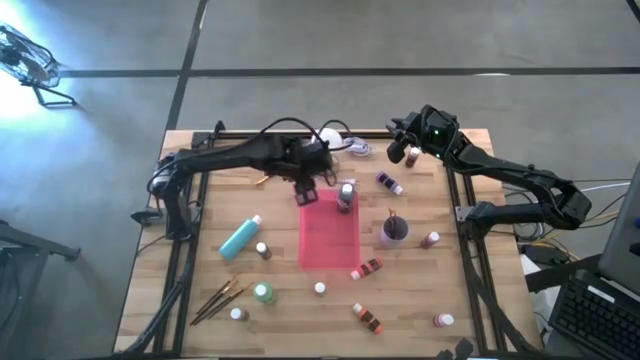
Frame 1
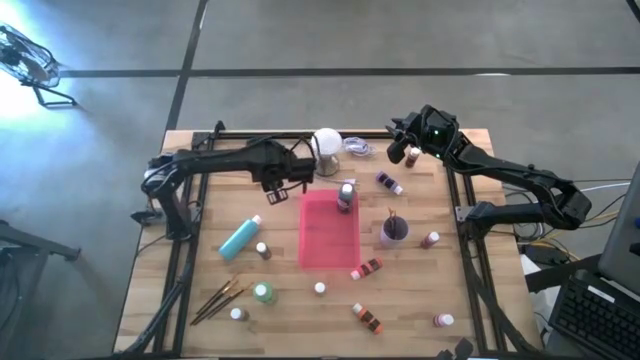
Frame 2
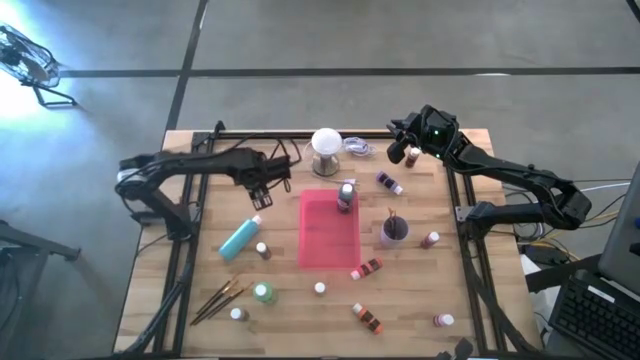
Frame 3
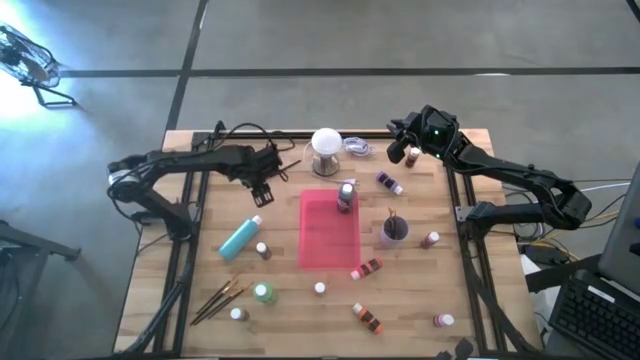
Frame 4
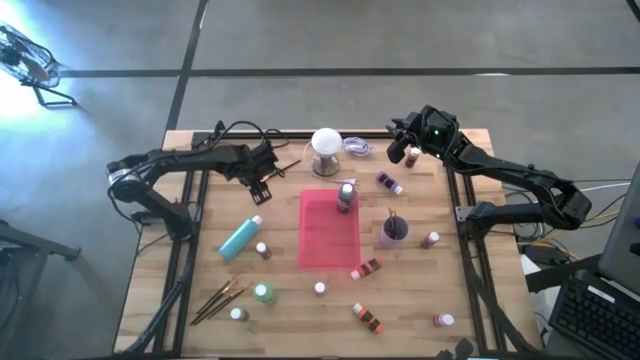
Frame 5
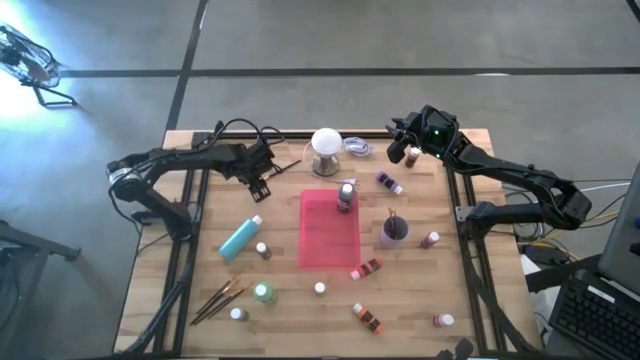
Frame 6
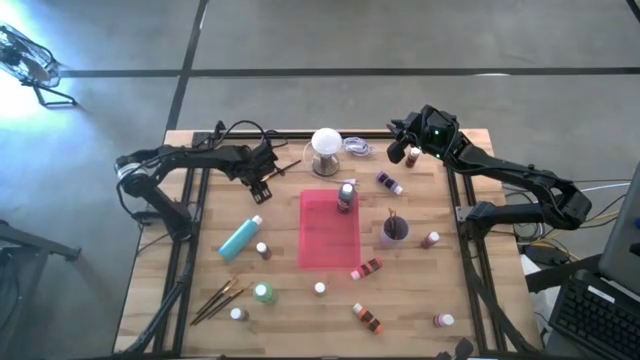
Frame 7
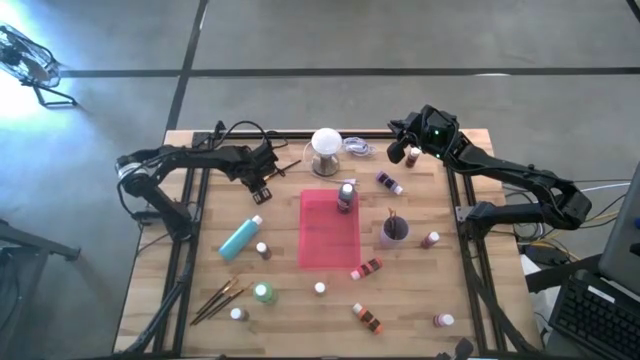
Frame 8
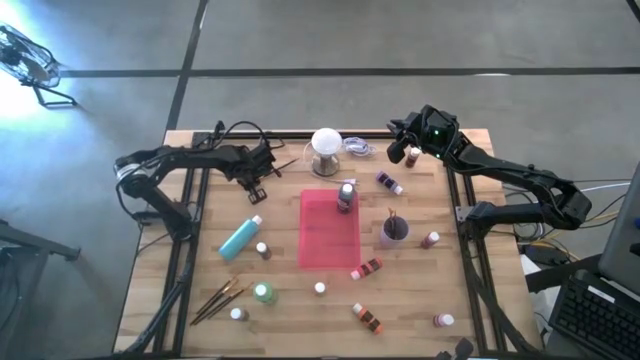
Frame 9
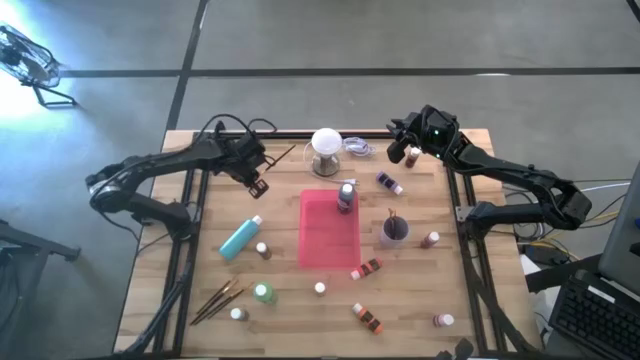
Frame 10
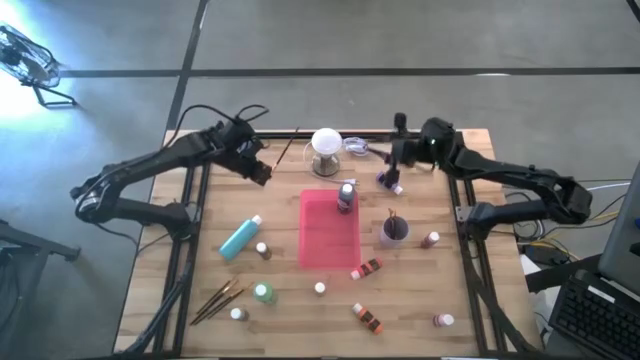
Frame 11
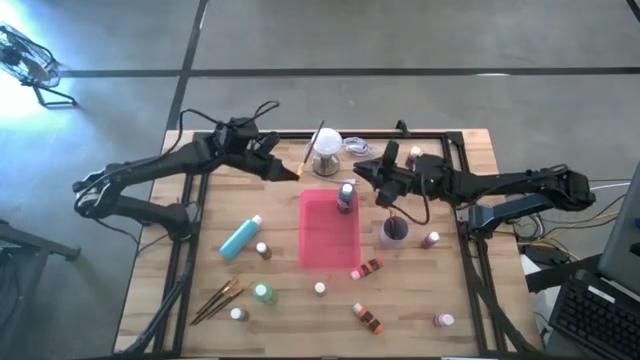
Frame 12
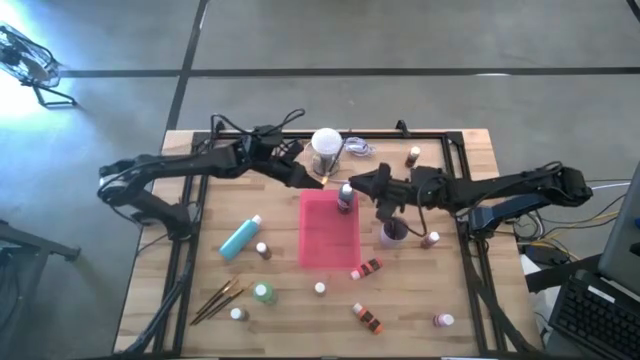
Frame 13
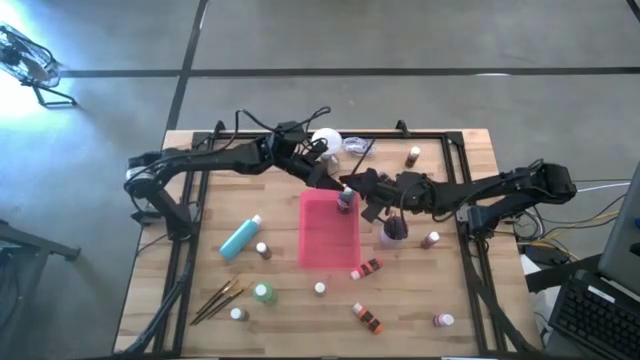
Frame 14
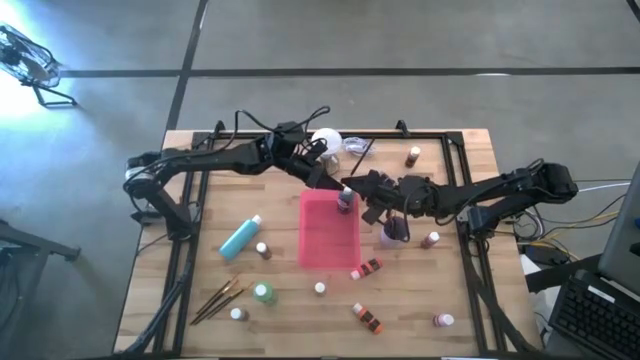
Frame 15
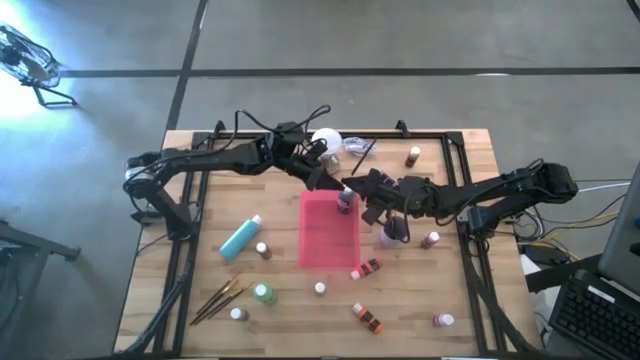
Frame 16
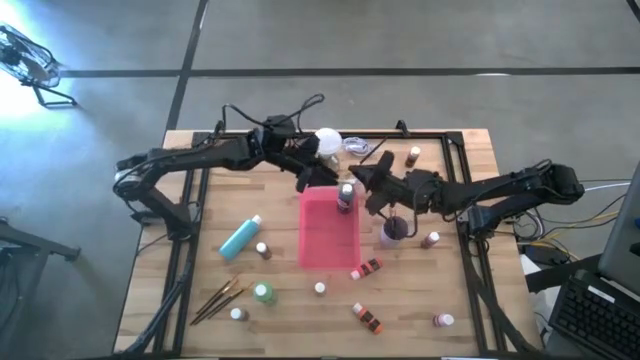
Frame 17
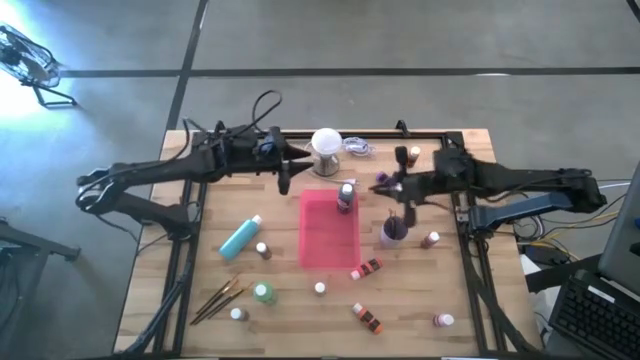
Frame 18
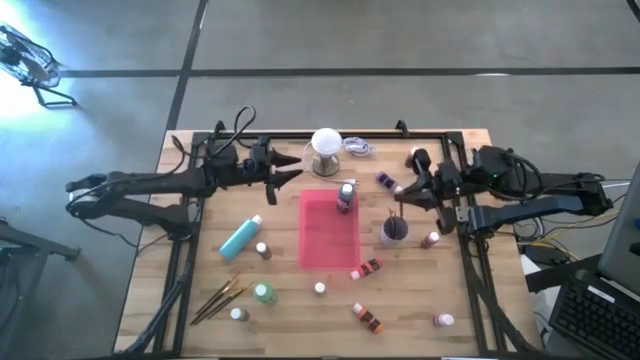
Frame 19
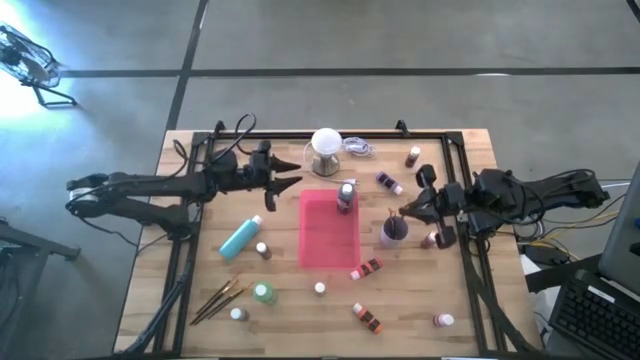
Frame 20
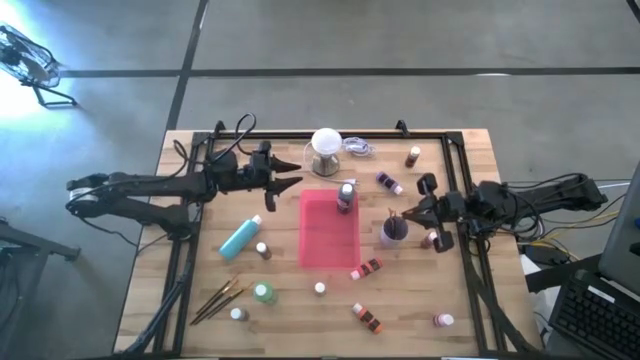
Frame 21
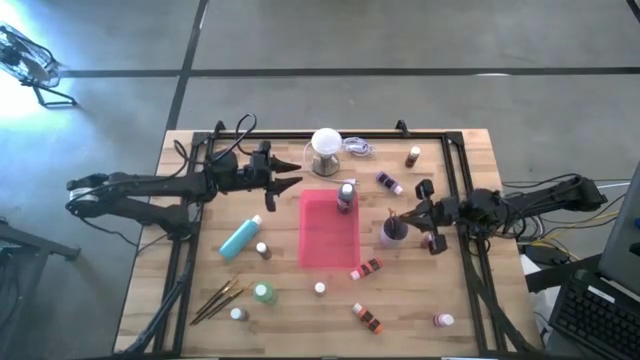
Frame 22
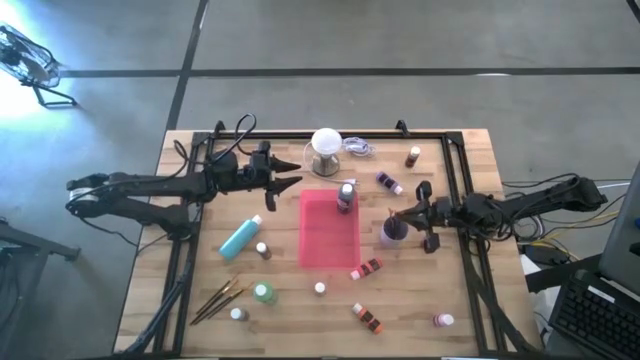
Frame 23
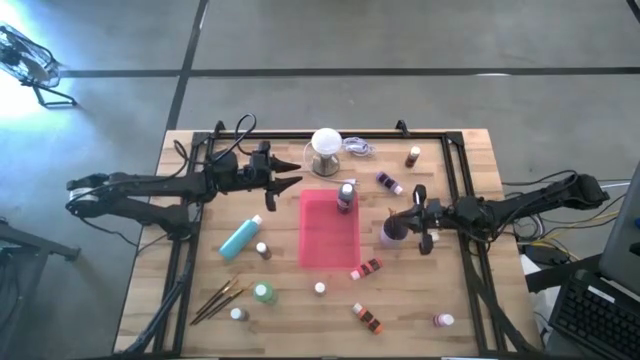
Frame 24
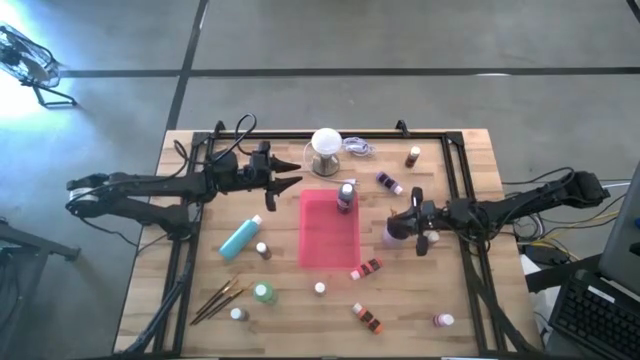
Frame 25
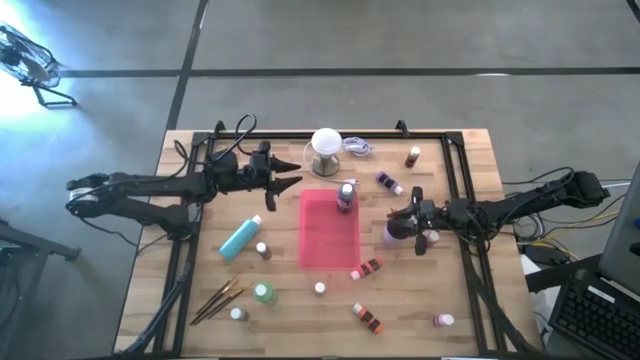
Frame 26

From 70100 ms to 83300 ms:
Task: Pick & Place Paint Supplies
Put the orange paintbrush into the purple cup
